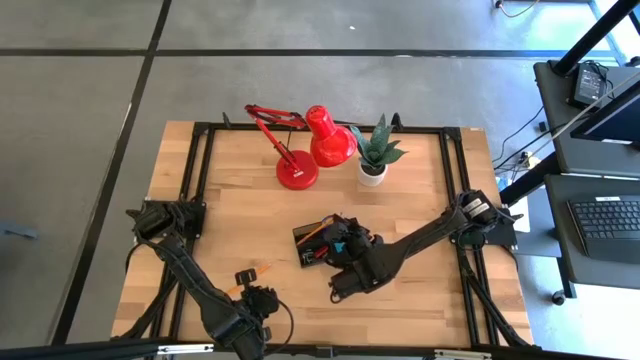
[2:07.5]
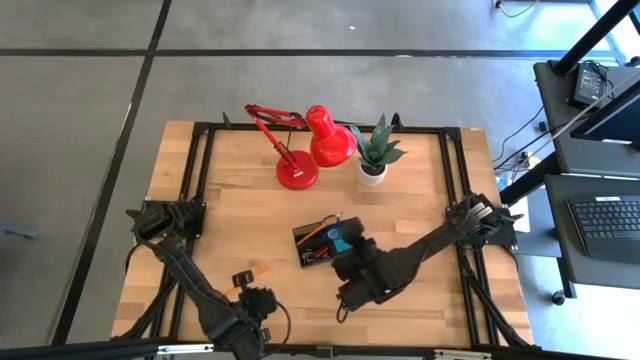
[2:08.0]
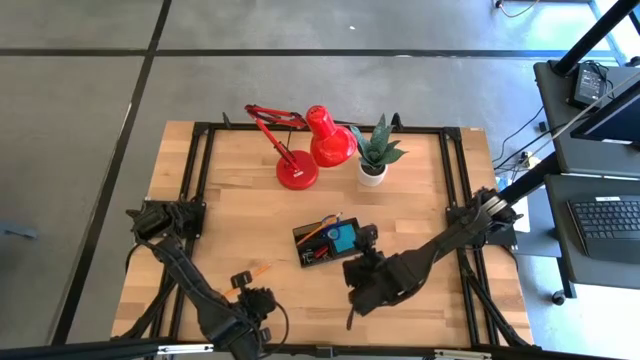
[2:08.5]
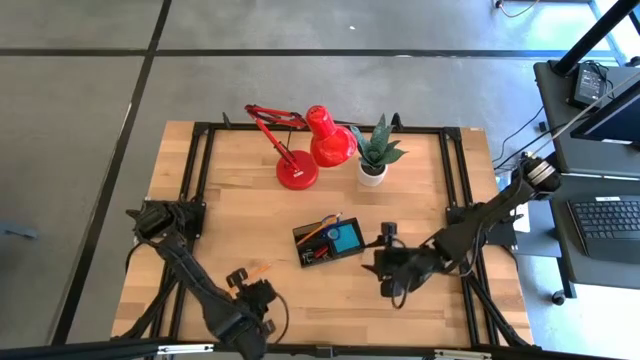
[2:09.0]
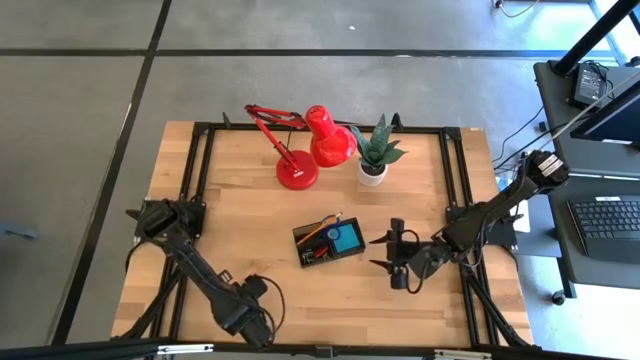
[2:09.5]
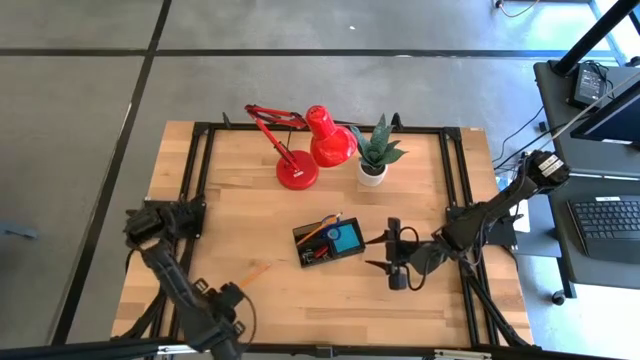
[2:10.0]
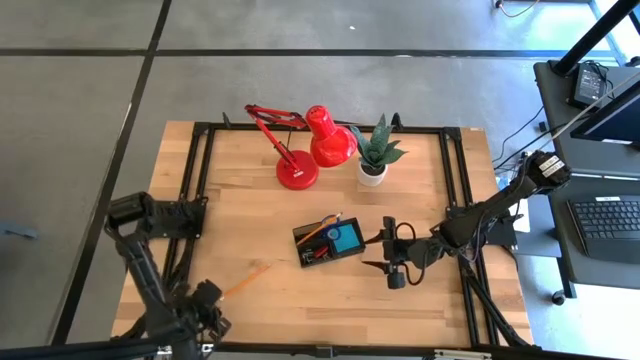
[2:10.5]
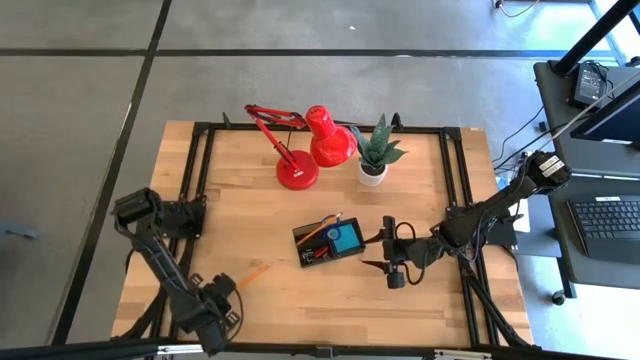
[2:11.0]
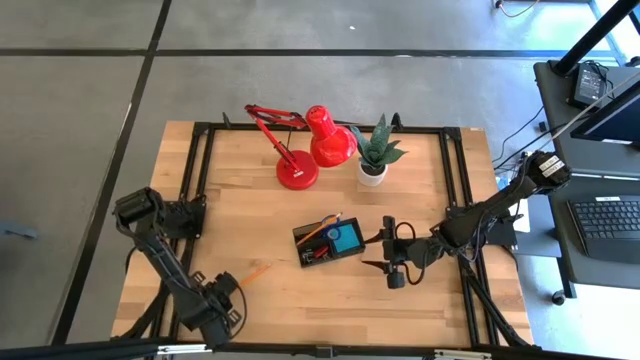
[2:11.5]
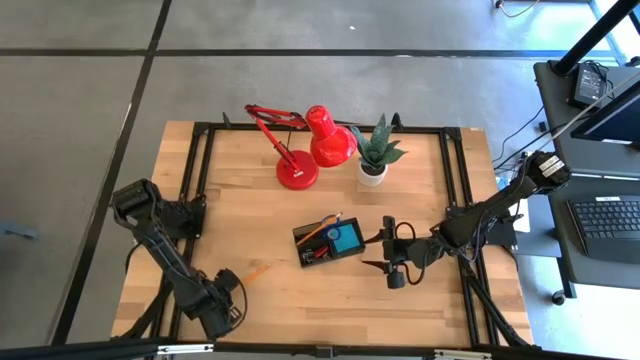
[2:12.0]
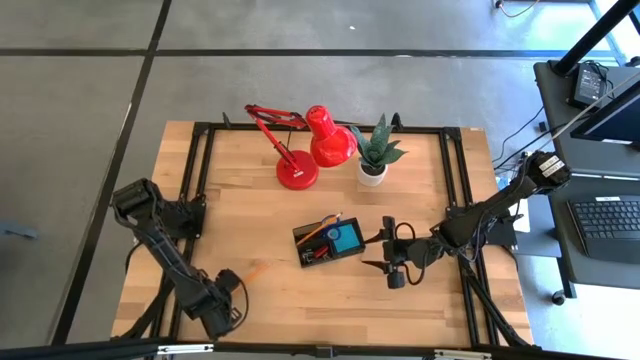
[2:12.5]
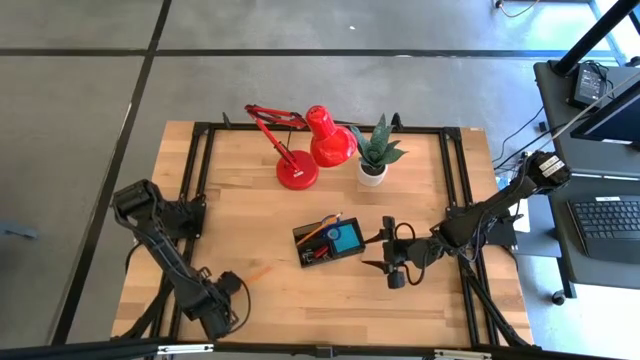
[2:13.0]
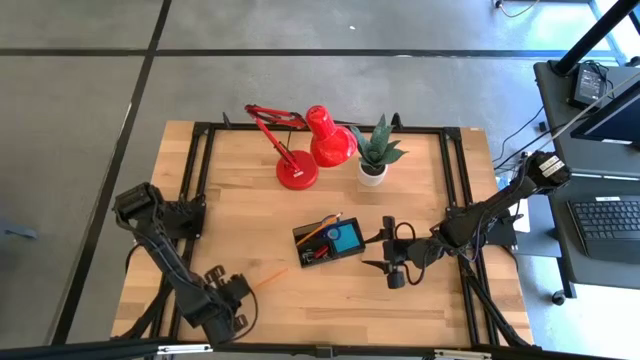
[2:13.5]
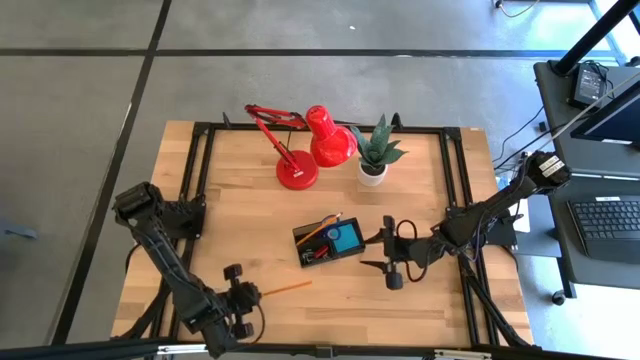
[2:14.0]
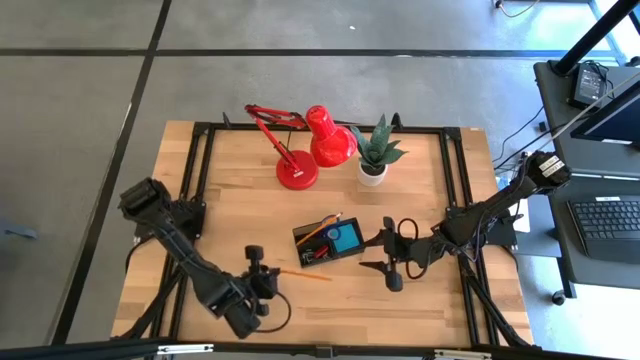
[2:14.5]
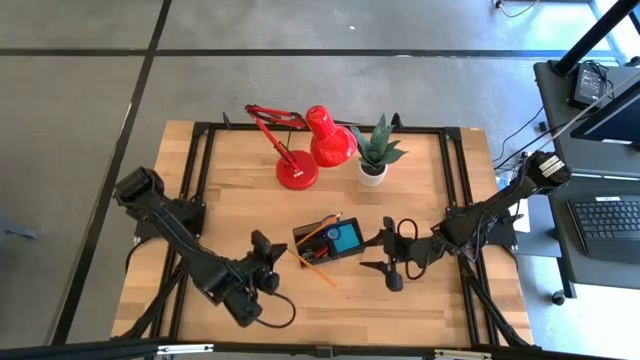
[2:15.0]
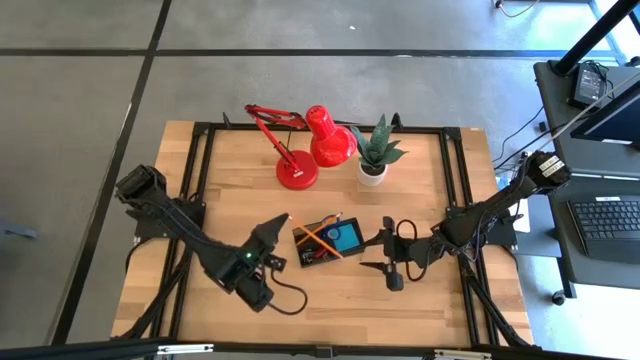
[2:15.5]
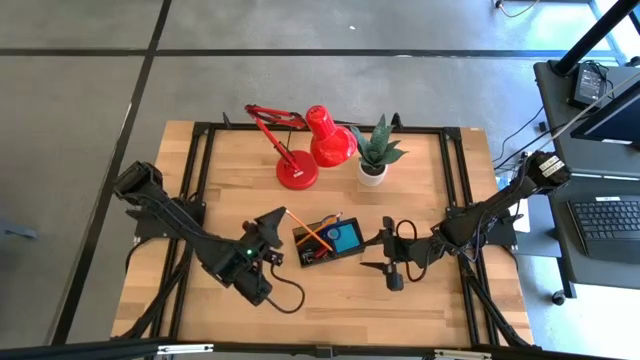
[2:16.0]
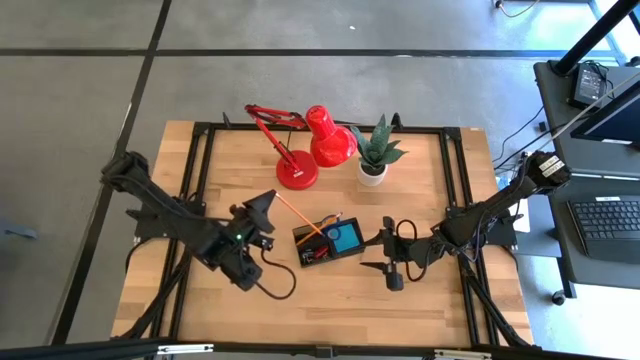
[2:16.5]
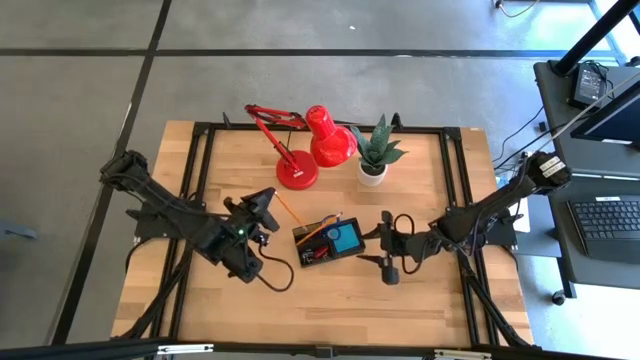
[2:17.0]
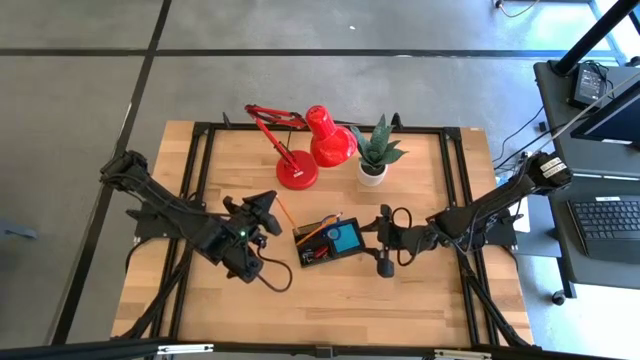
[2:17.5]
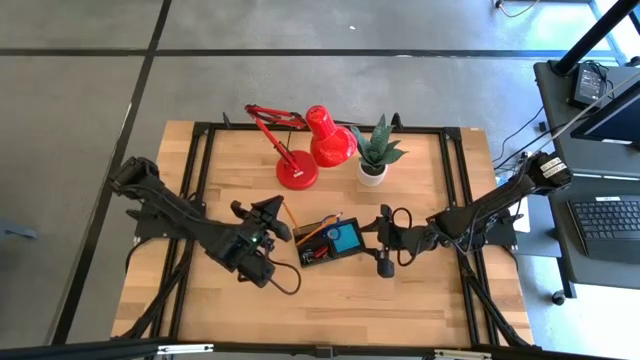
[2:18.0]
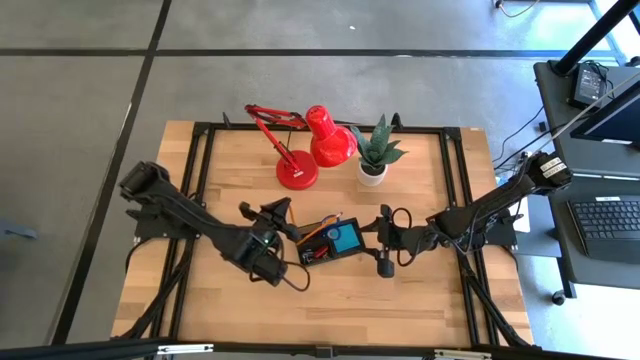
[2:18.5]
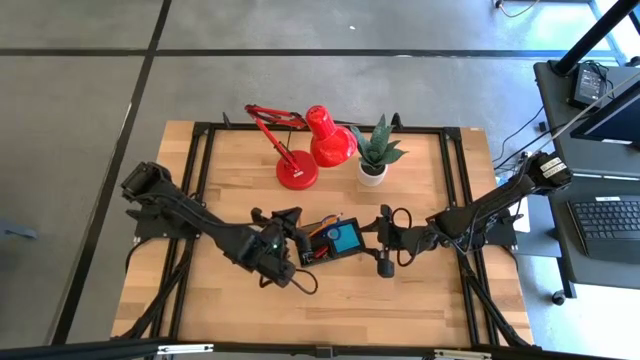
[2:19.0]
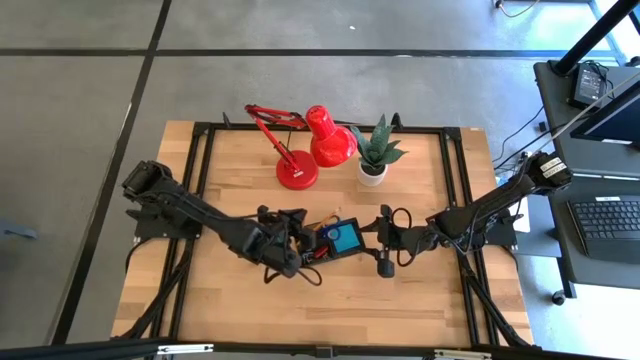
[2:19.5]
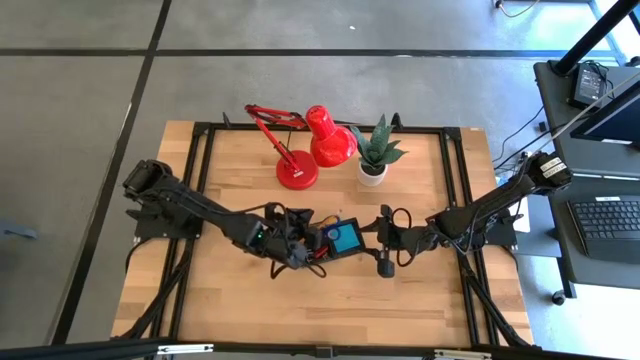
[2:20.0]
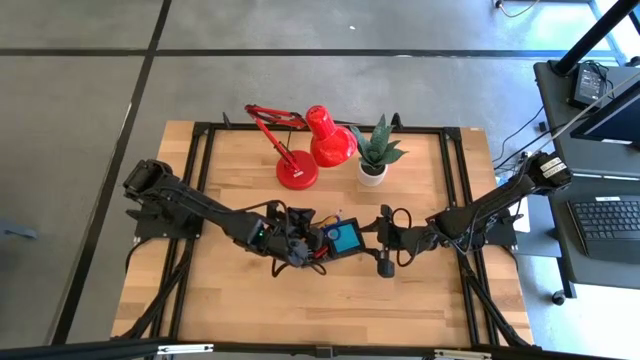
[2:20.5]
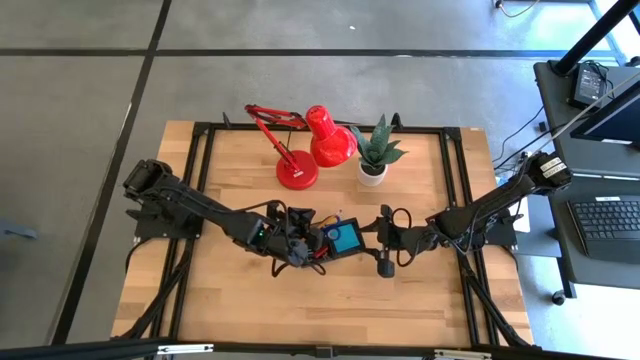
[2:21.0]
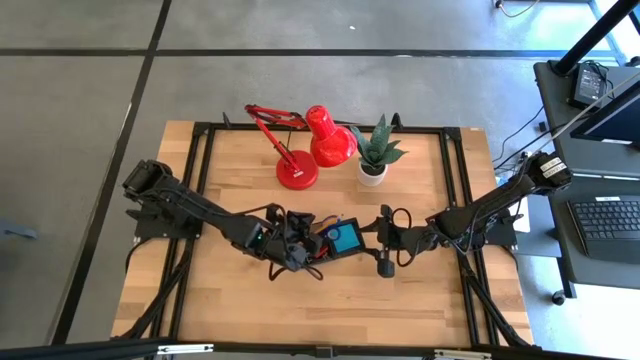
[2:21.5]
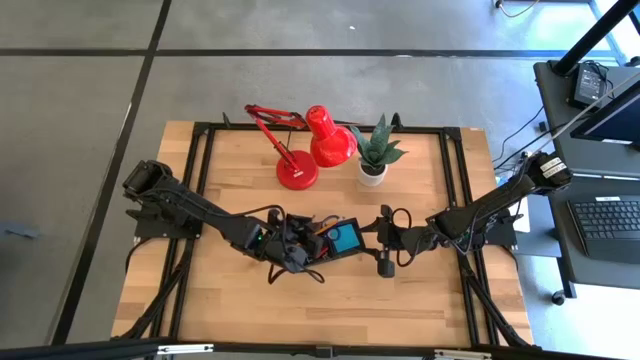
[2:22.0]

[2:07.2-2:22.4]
Task: Pick and place office supplies into organizer
Put the yellow pencil into the black desk organizer

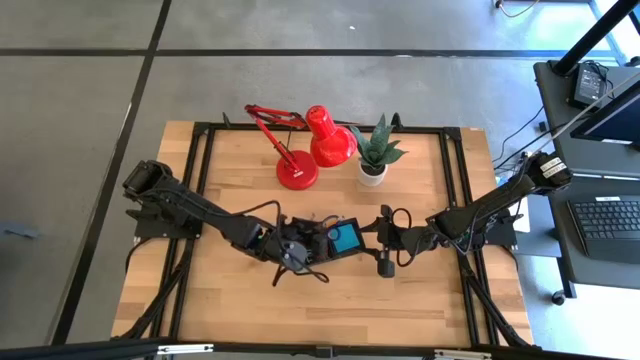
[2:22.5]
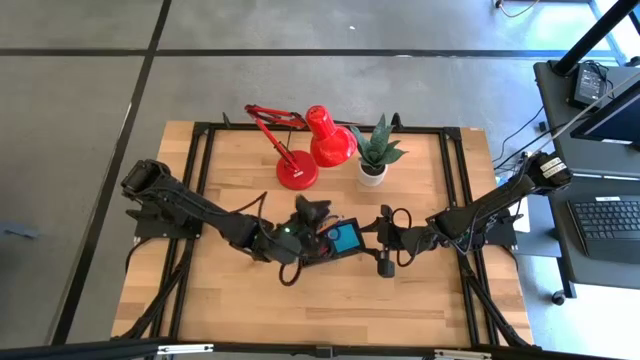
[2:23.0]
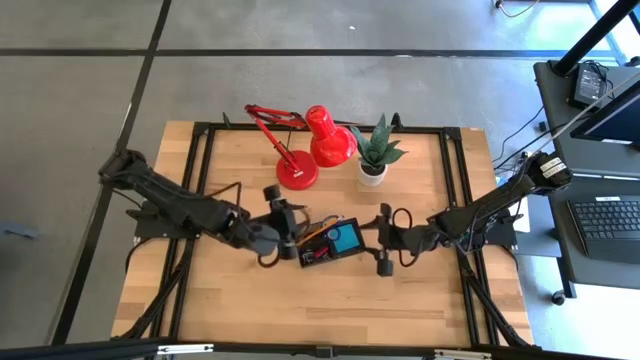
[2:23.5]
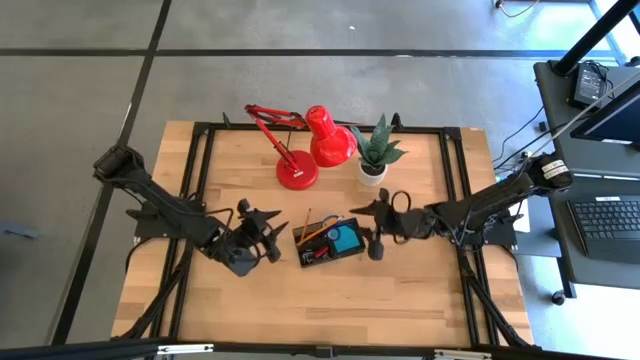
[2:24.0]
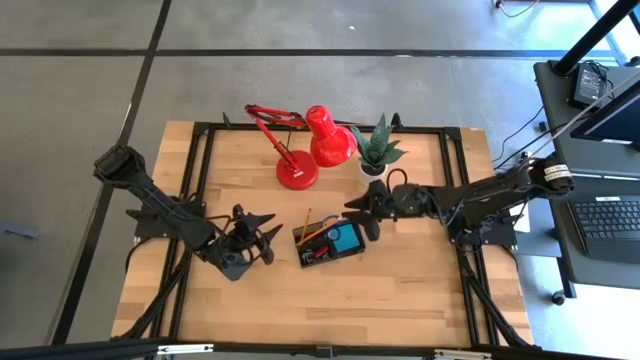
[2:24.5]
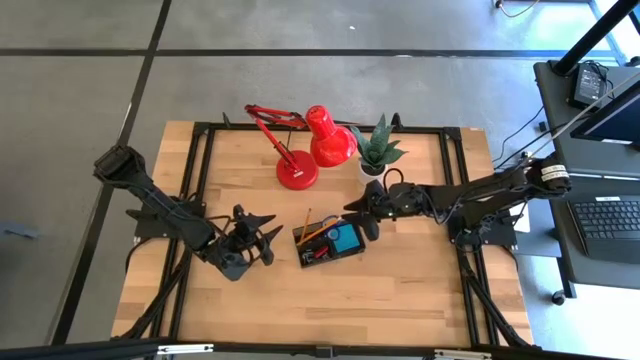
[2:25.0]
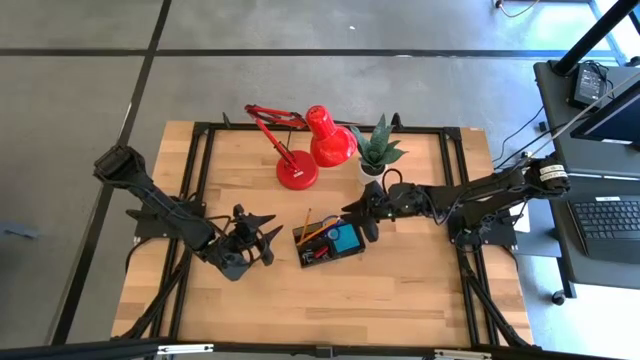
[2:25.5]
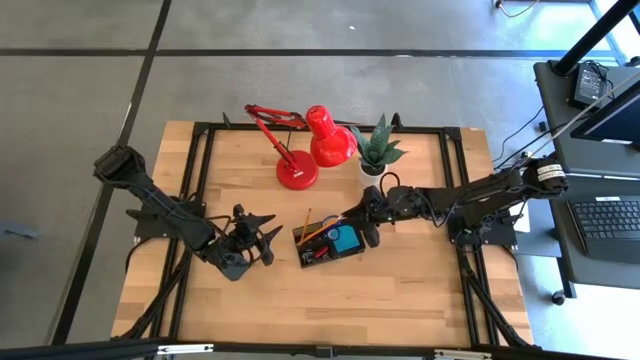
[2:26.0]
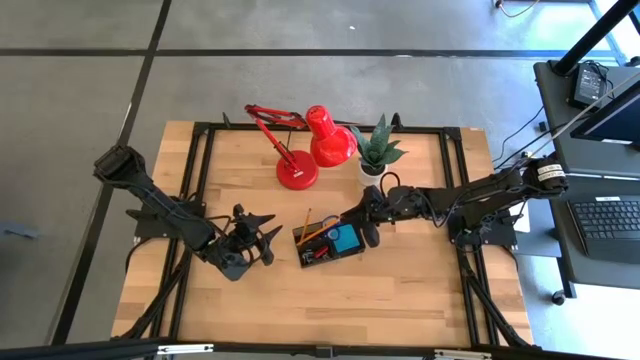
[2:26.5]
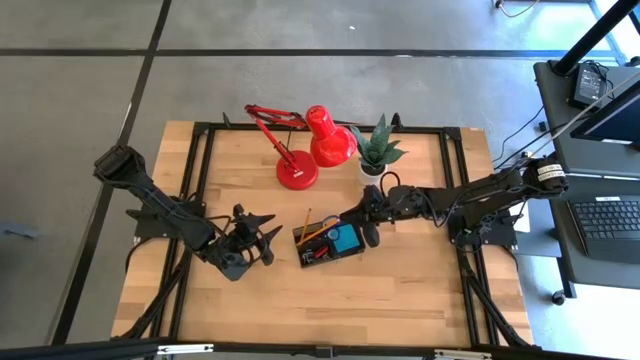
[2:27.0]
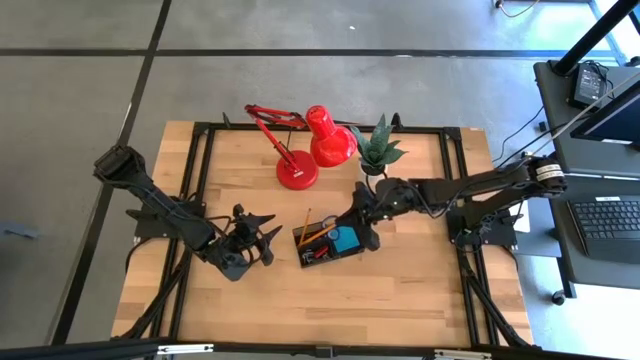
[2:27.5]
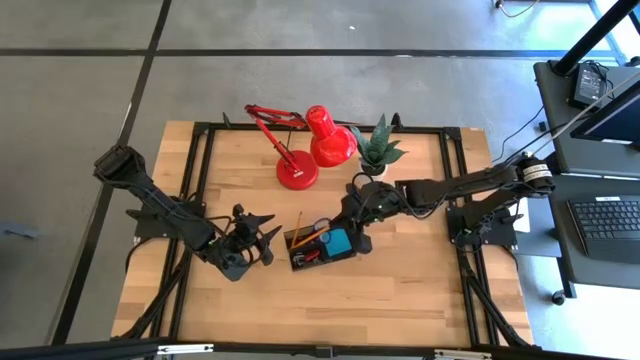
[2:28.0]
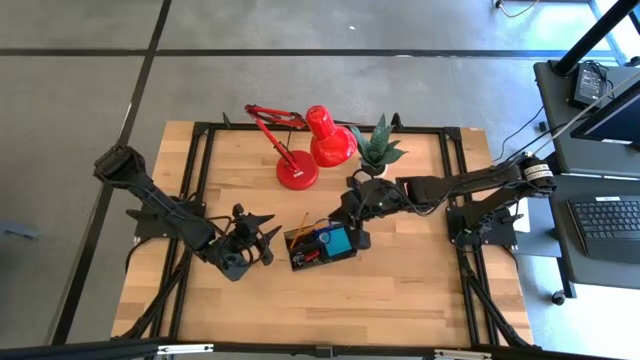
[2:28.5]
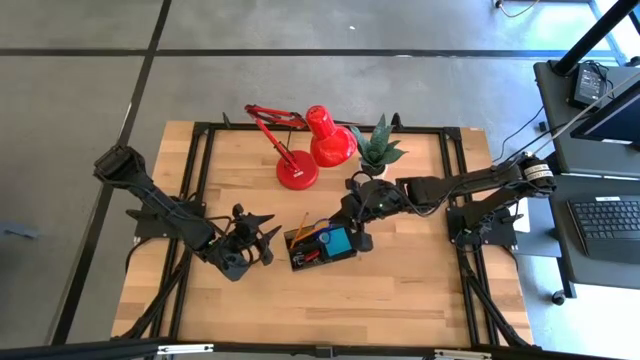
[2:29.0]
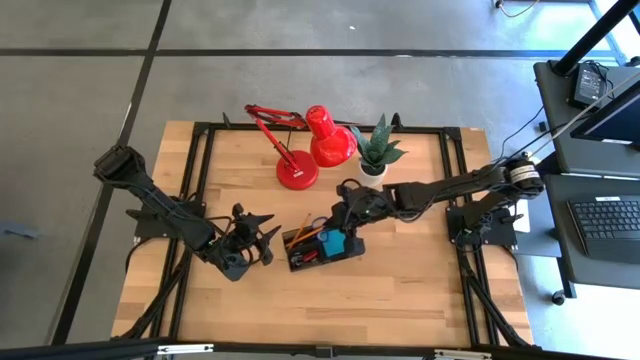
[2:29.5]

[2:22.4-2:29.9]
Adjust the yellow pencil into the black desk organizer
